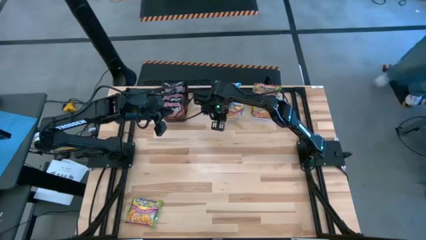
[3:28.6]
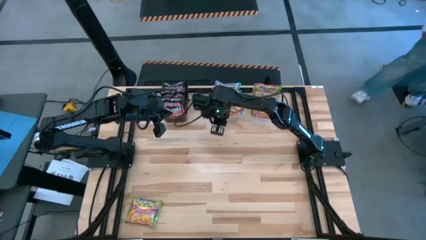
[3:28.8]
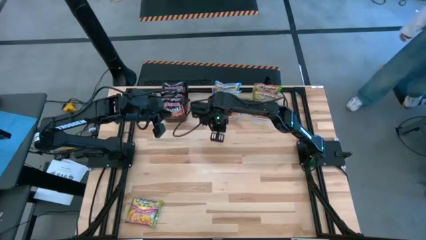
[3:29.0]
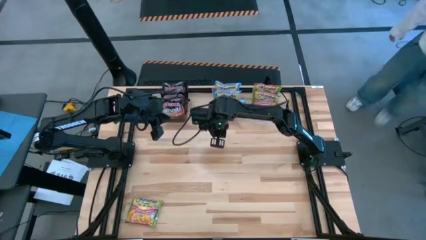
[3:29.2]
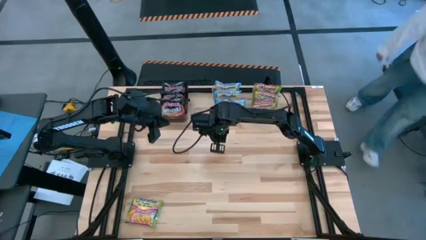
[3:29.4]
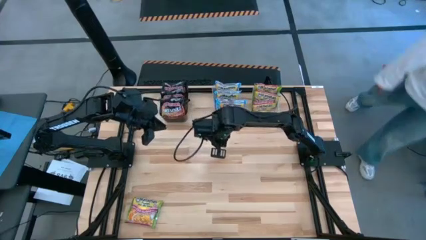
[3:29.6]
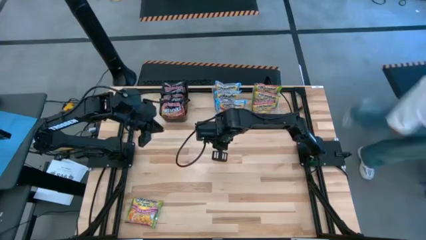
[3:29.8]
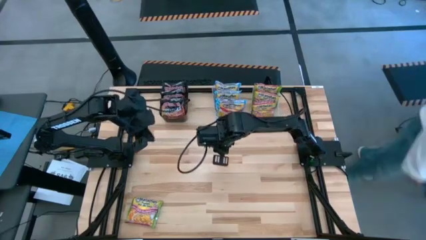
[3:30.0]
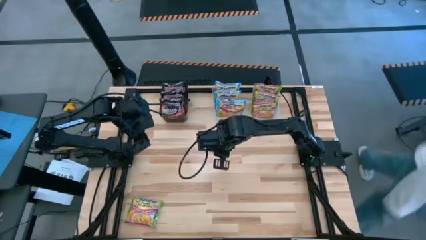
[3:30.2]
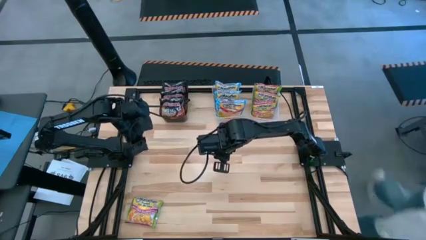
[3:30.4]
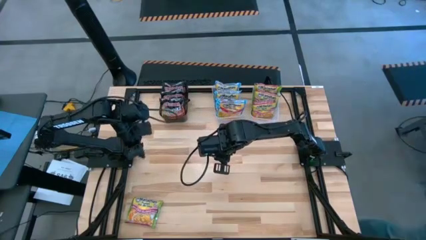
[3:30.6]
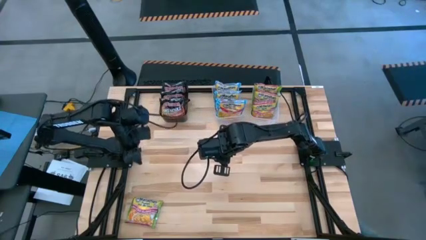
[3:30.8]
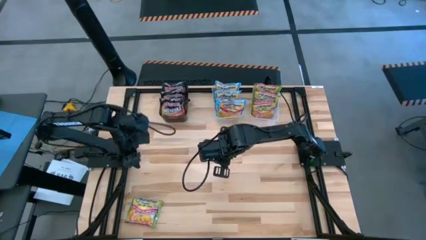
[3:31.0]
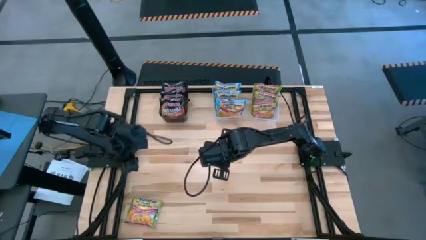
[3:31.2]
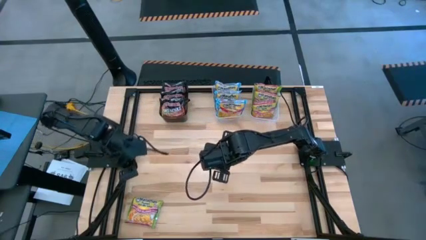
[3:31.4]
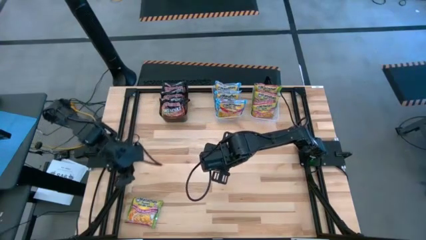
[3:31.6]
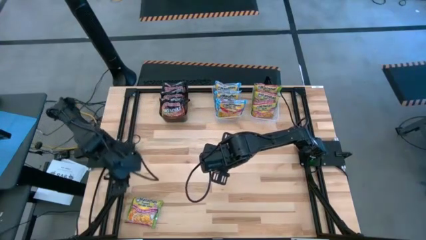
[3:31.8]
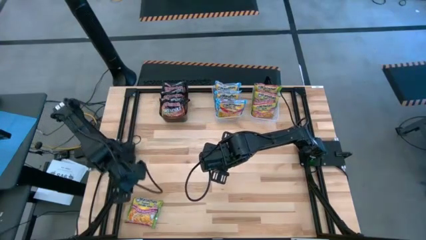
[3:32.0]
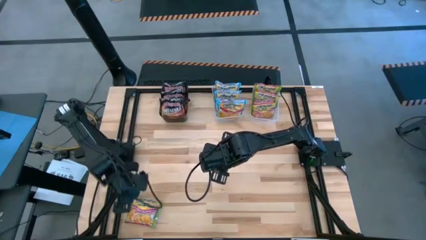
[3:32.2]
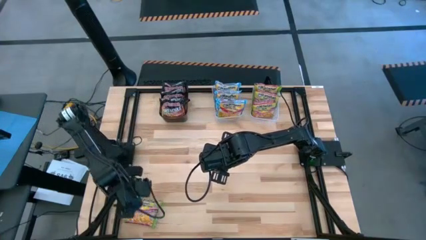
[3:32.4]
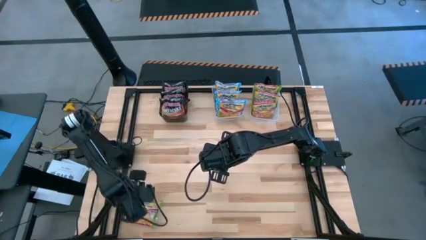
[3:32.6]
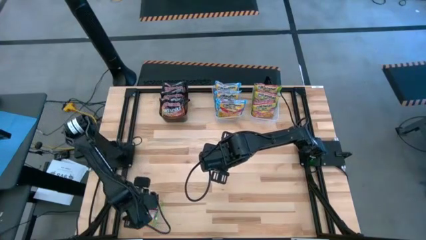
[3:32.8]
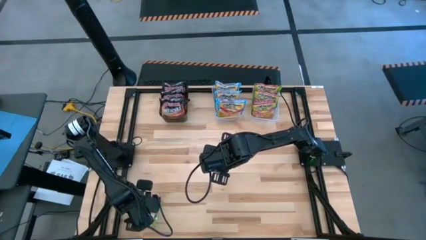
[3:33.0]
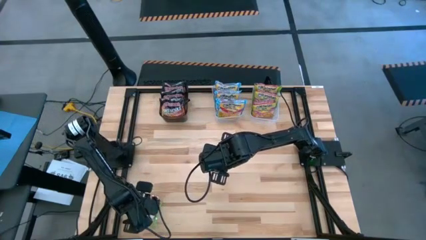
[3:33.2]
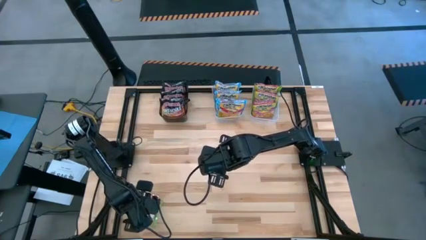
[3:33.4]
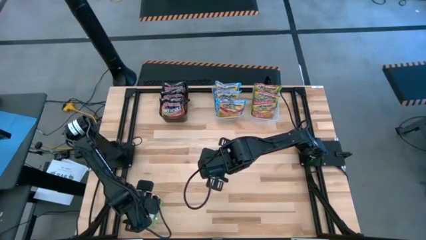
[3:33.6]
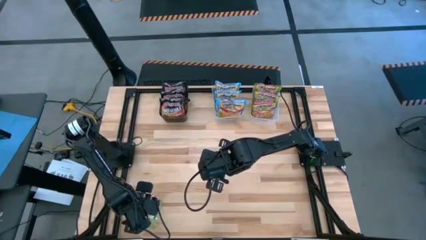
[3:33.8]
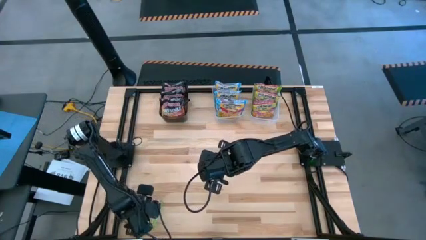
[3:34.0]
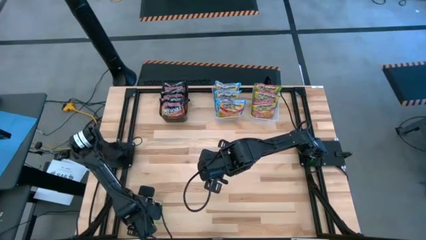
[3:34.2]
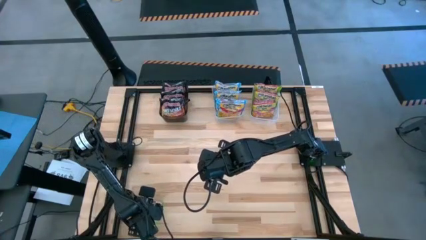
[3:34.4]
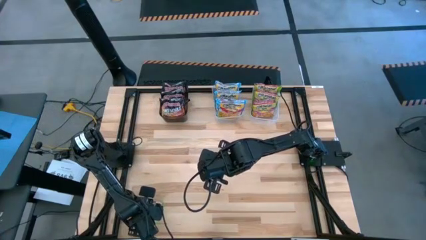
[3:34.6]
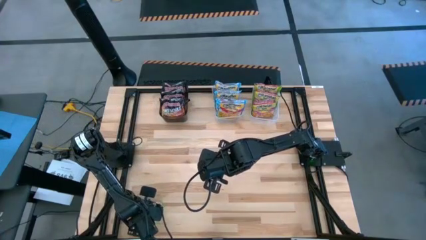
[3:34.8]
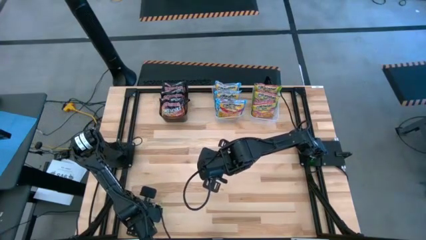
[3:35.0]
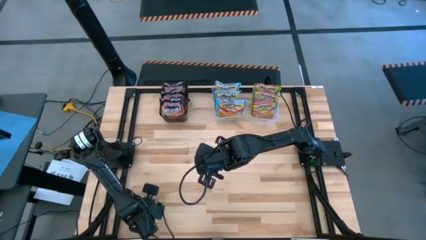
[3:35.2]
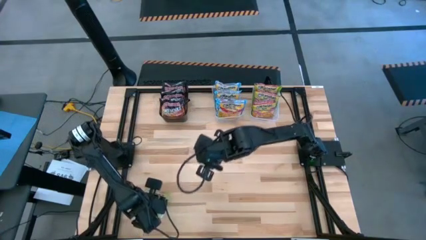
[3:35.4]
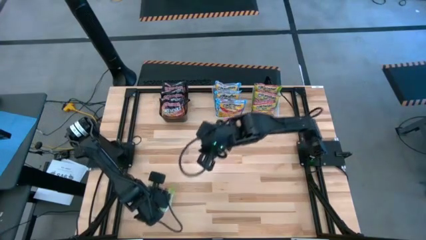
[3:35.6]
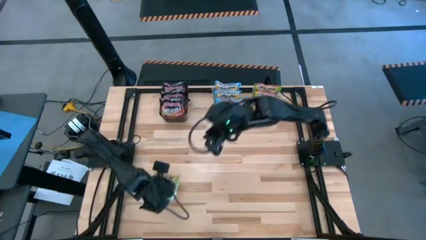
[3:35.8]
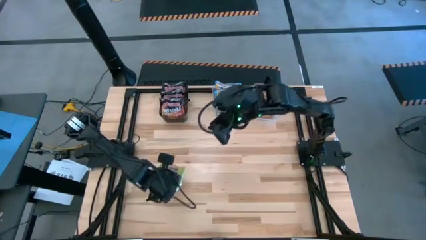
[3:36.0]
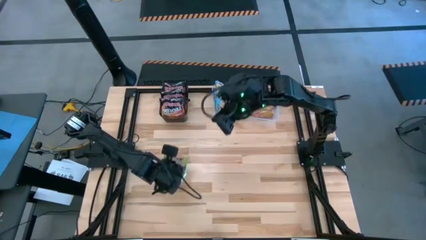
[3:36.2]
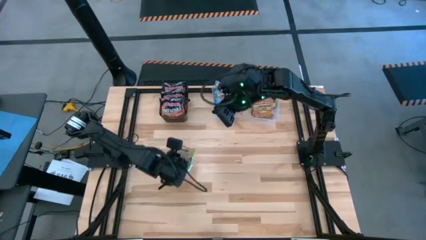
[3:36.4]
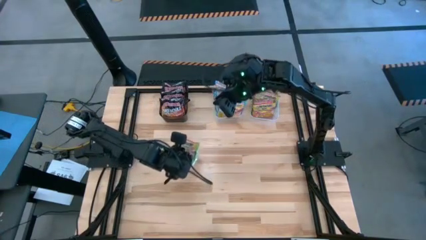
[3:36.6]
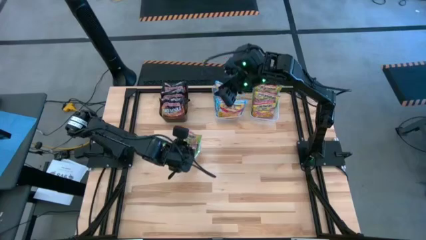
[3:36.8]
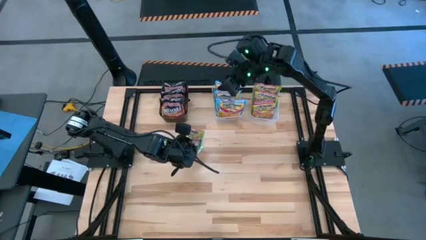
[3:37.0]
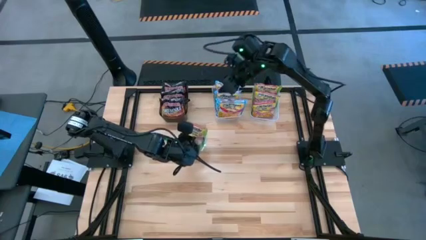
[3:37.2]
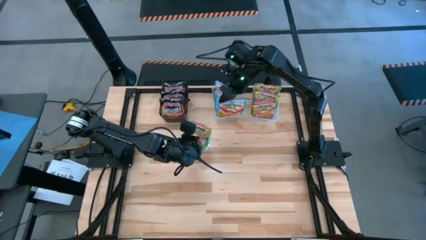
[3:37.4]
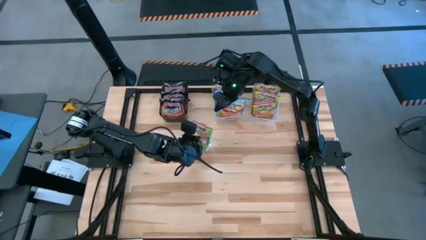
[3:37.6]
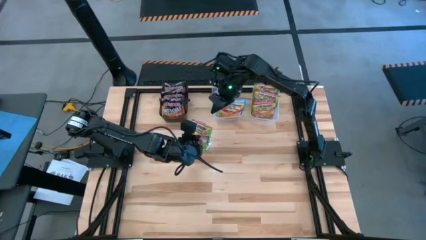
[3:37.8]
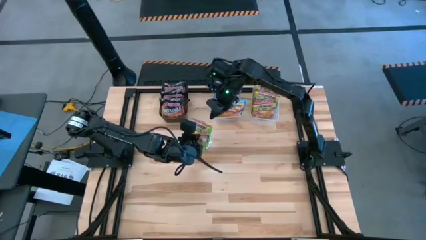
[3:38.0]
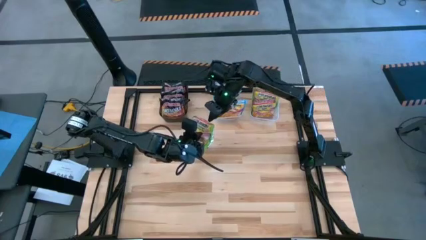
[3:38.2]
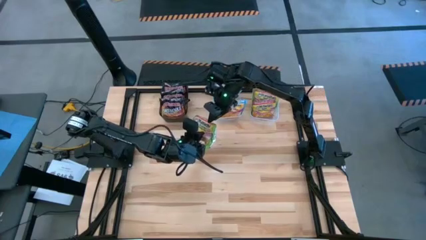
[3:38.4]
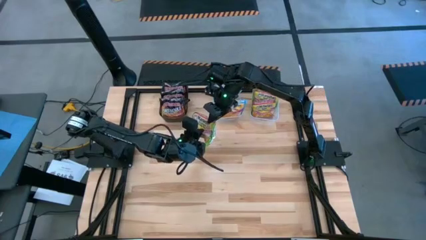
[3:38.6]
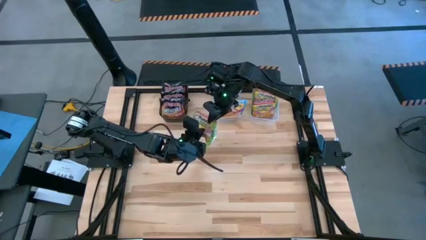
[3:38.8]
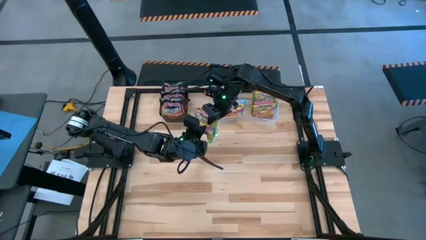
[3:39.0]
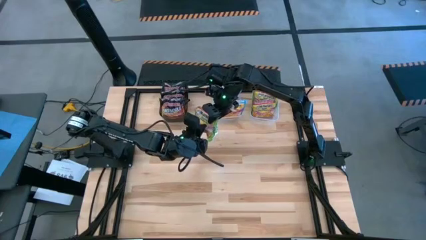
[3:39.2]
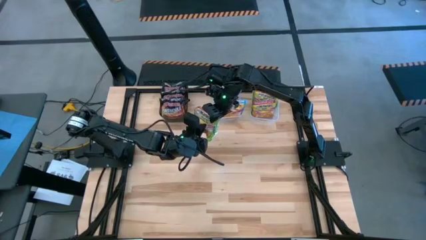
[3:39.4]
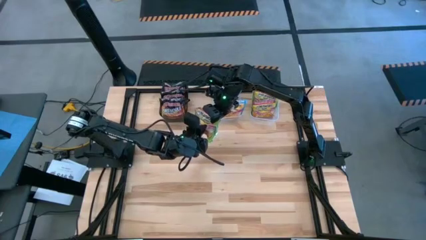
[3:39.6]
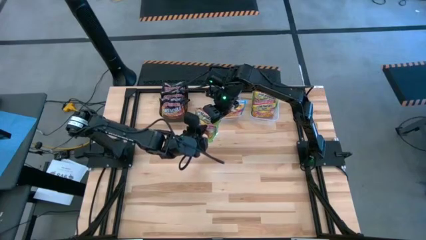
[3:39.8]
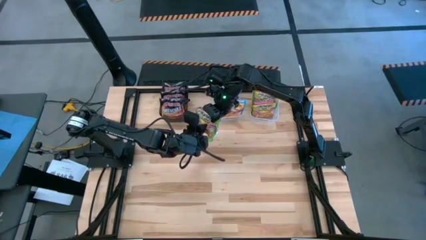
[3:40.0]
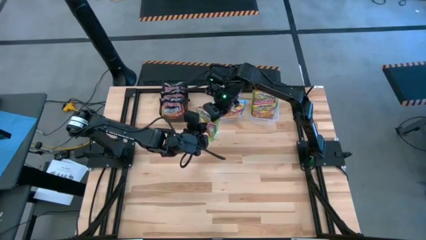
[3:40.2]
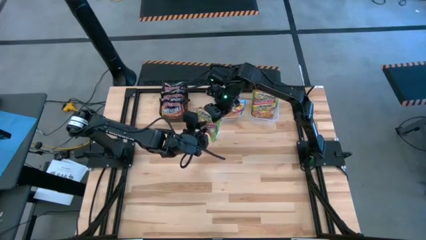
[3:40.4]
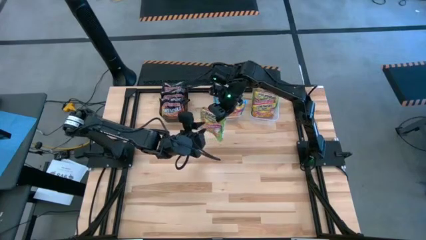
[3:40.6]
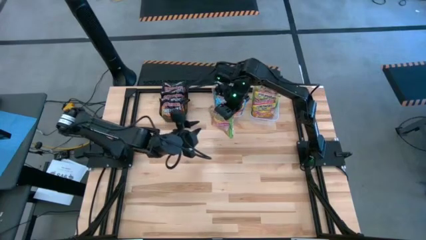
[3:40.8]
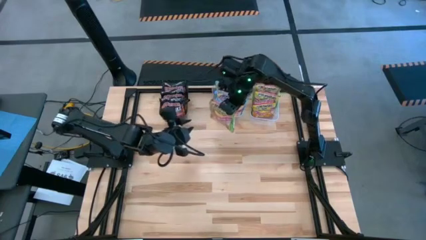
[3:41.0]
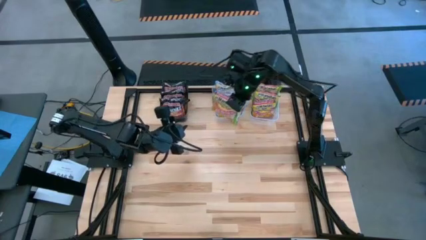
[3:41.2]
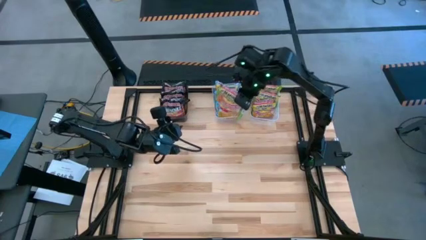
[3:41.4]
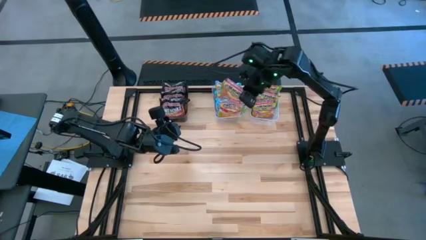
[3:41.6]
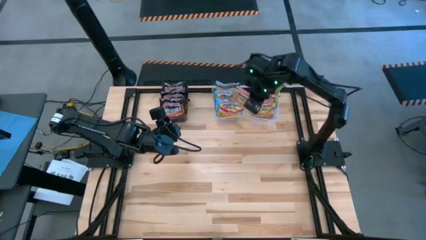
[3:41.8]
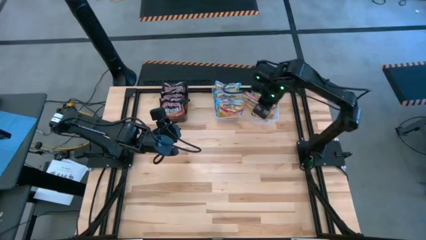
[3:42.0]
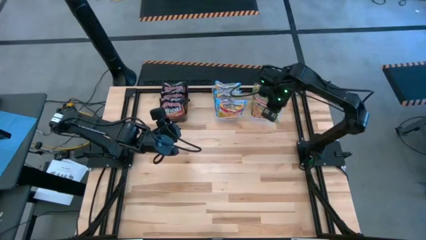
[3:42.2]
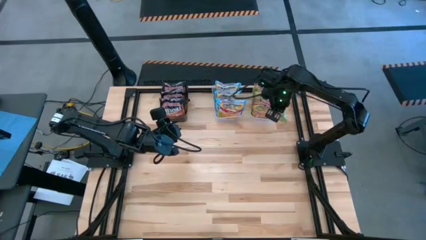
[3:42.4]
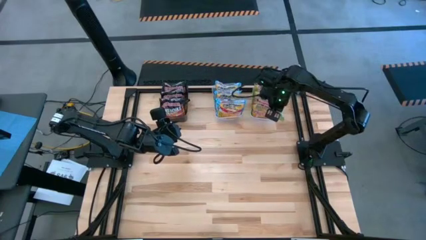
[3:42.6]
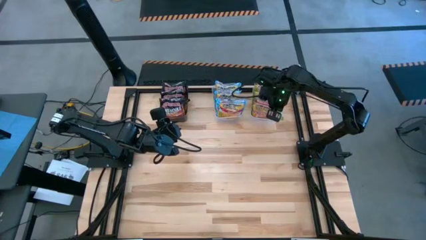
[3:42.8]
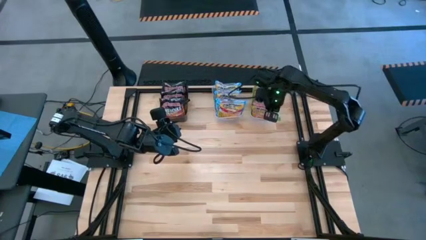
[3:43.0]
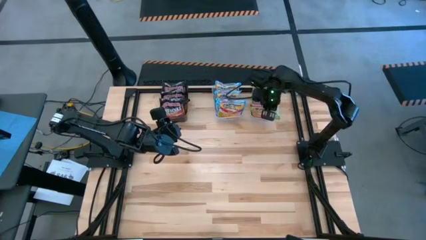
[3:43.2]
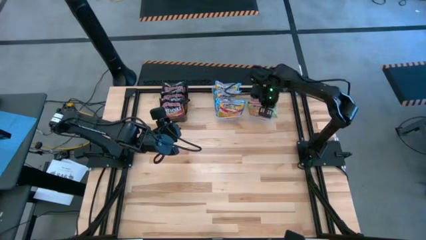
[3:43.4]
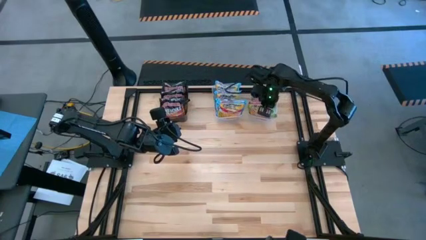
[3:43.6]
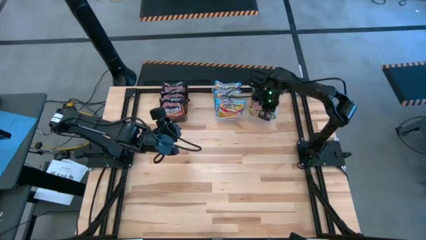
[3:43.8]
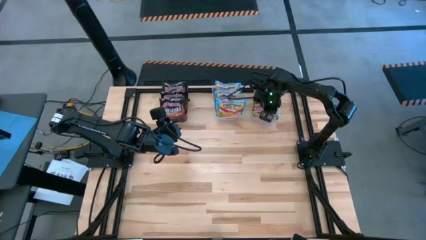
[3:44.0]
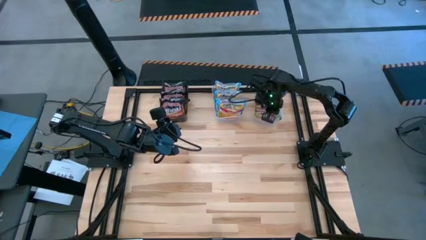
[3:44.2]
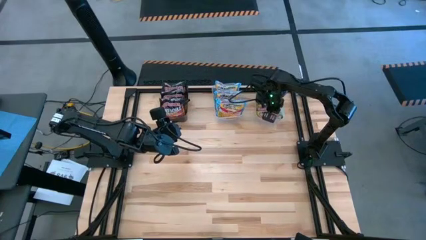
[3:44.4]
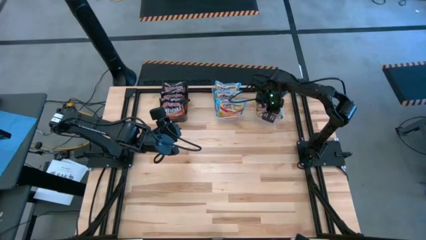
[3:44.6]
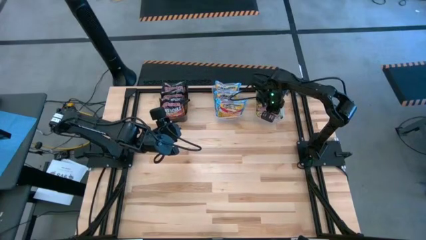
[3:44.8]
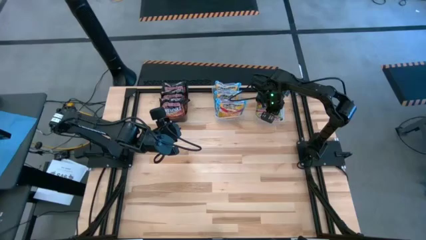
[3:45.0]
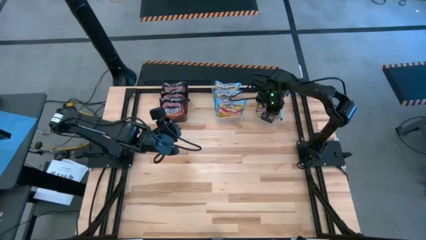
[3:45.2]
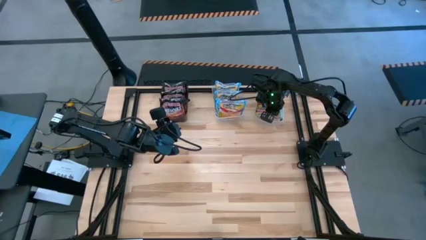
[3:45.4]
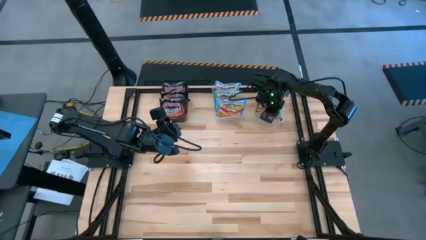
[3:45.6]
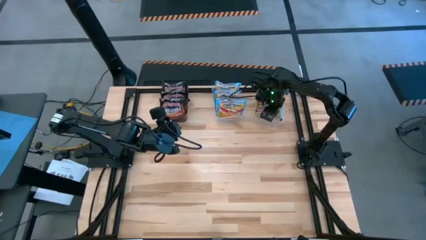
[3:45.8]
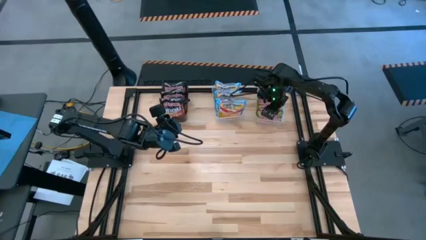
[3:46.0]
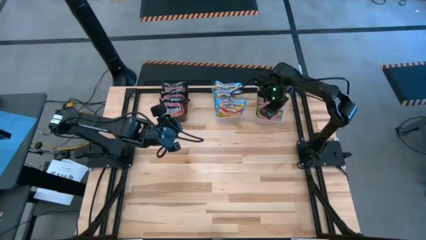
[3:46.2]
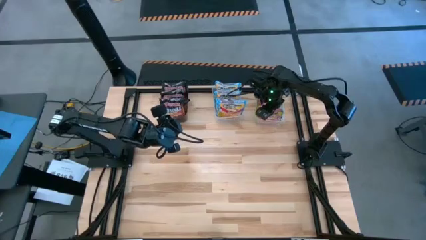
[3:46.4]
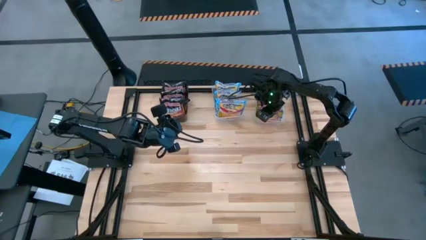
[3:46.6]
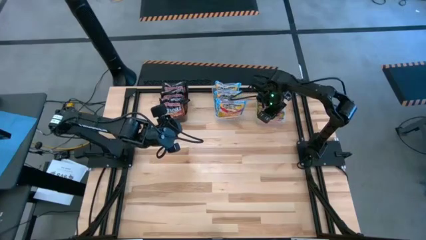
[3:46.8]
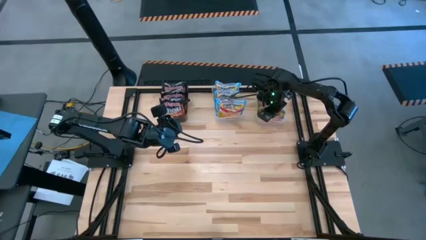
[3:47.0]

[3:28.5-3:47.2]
Task: Sort Maruchan noodles
Put the light green noodle pack into the right transparent bin
